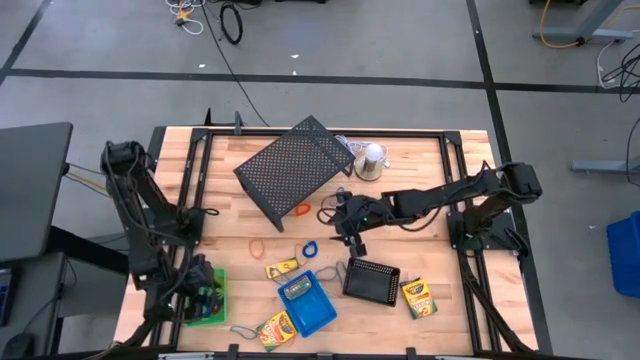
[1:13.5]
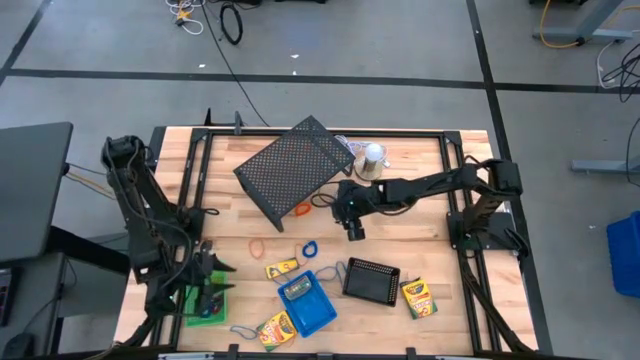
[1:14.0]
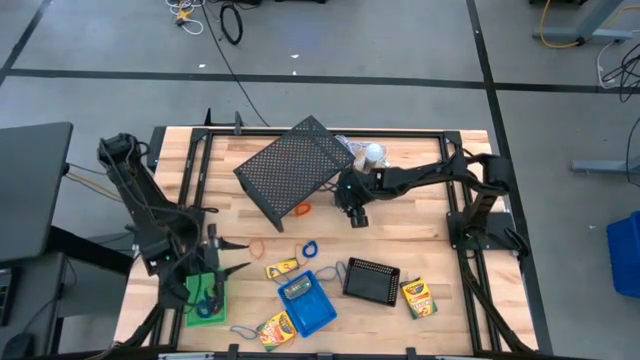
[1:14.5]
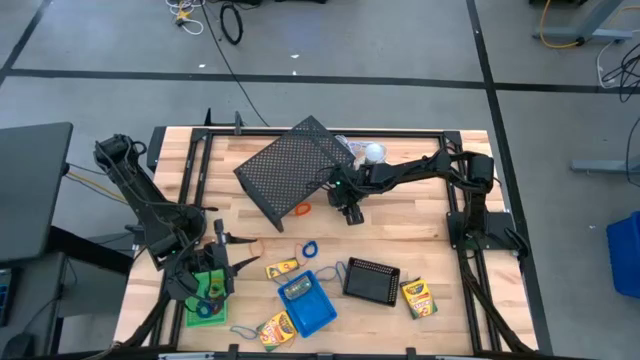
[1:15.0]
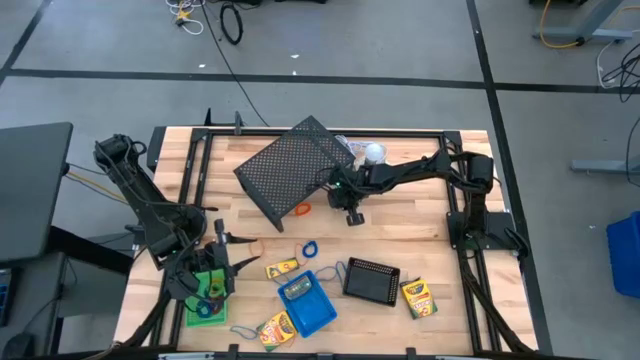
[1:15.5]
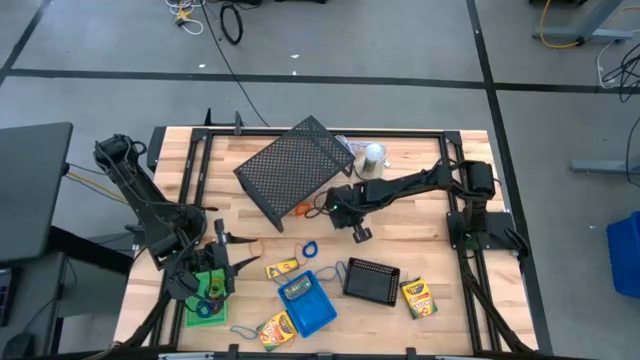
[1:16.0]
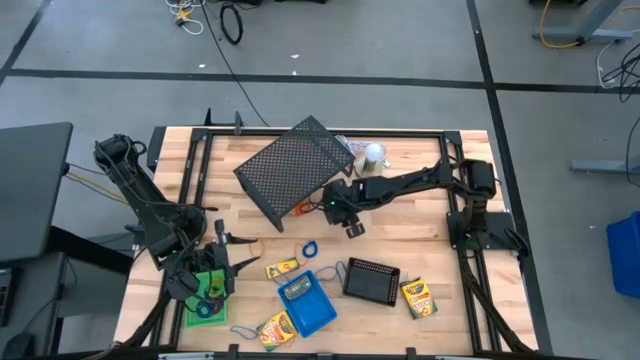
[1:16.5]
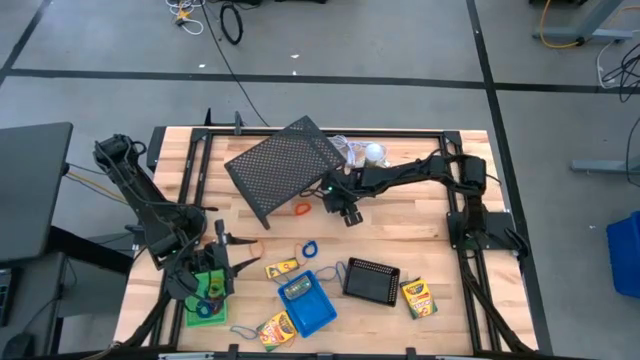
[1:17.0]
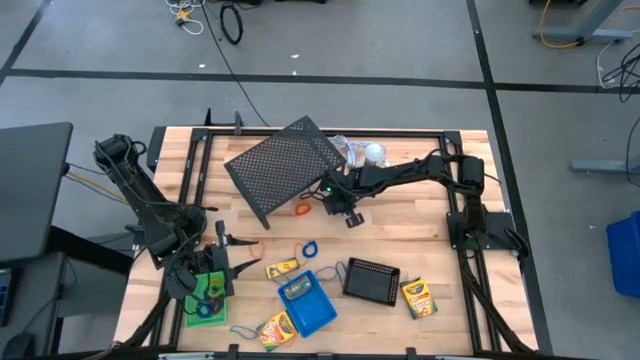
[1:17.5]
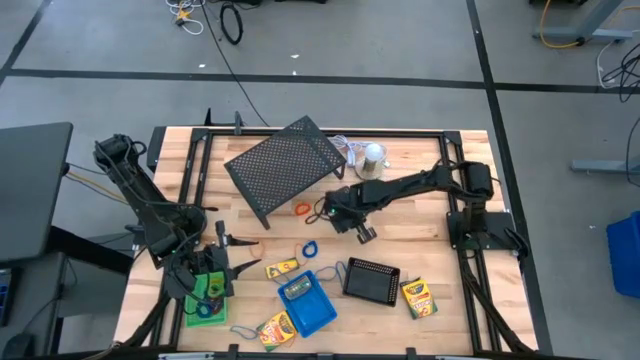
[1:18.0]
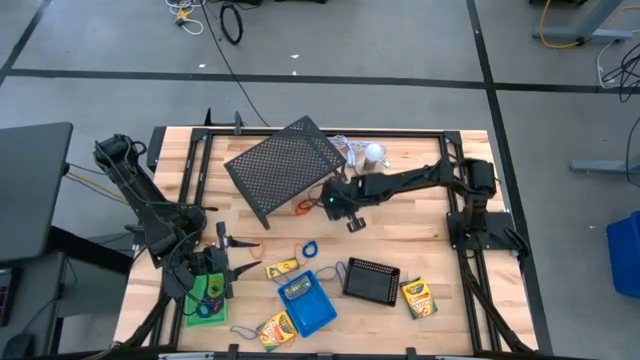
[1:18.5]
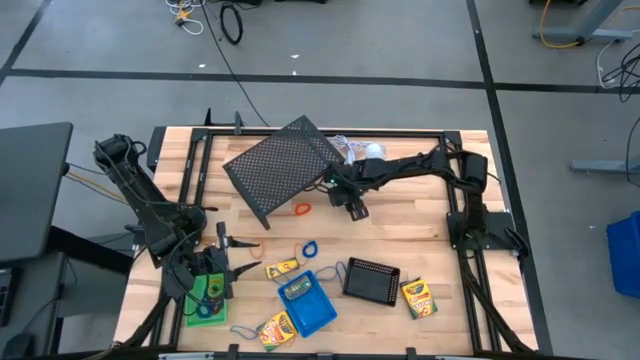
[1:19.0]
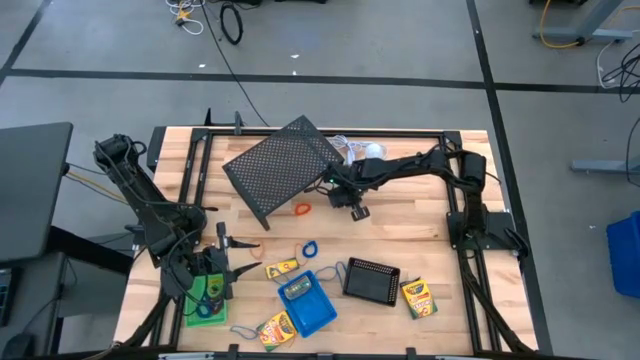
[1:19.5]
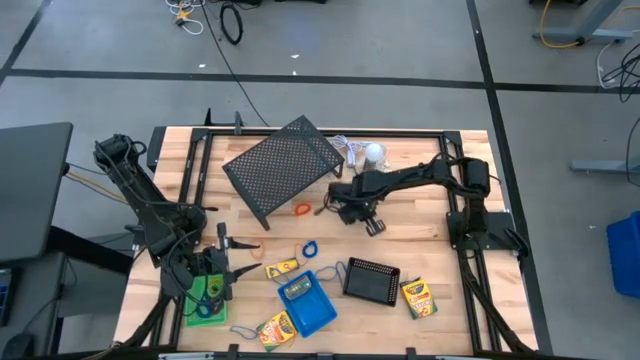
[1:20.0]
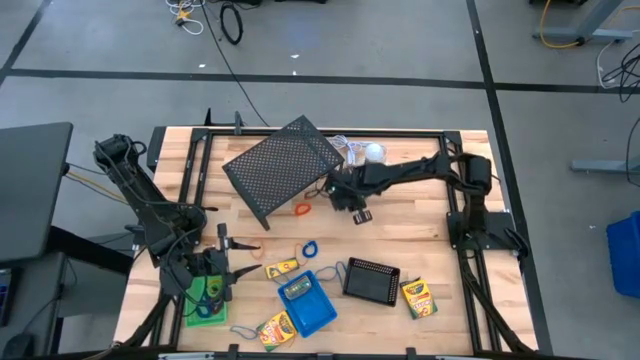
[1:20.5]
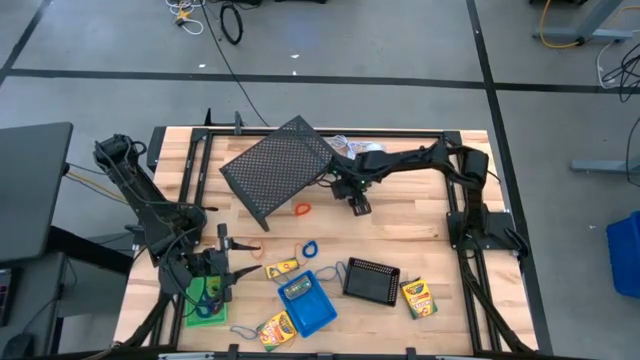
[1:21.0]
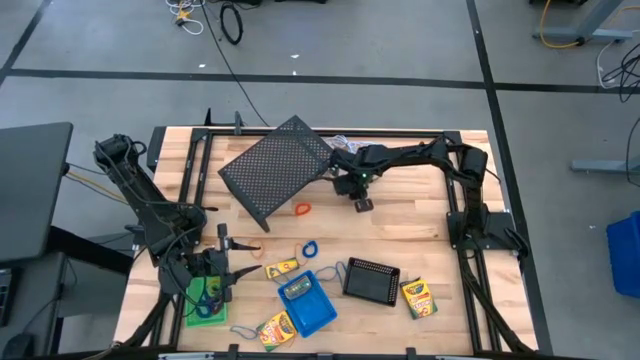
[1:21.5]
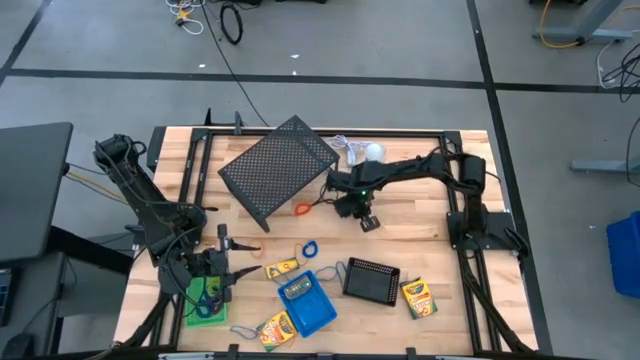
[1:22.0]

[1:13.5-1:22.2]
Task: Pick & Place Office Desk Supplies
Put the blue rubber band into the black bin

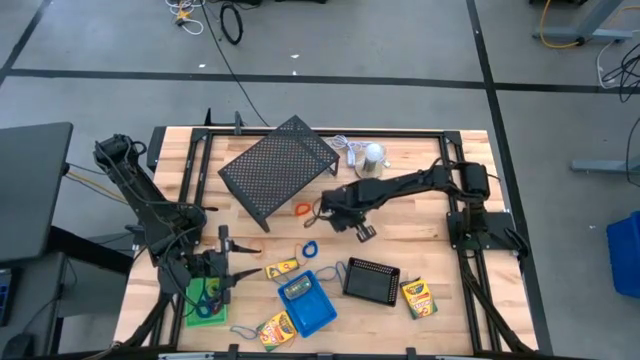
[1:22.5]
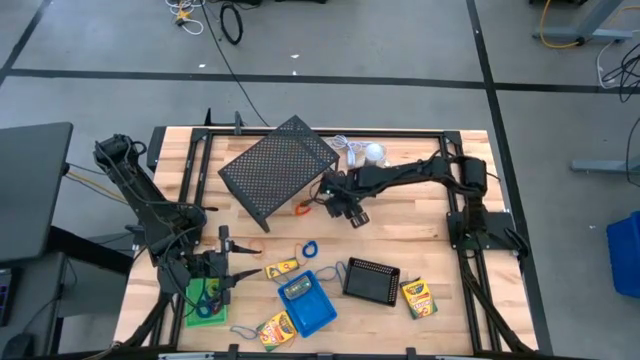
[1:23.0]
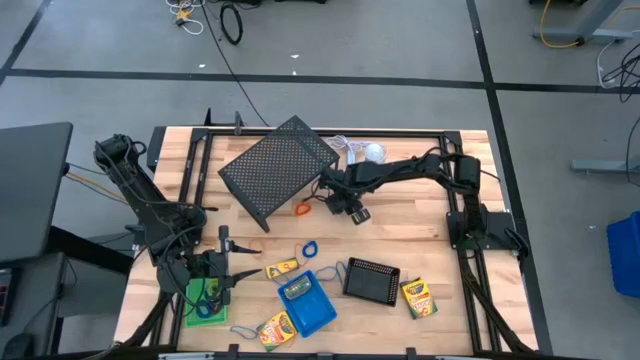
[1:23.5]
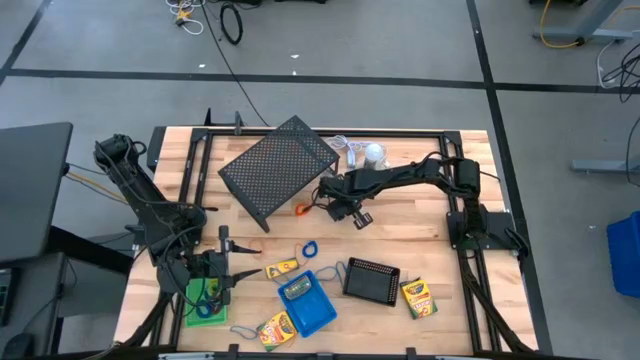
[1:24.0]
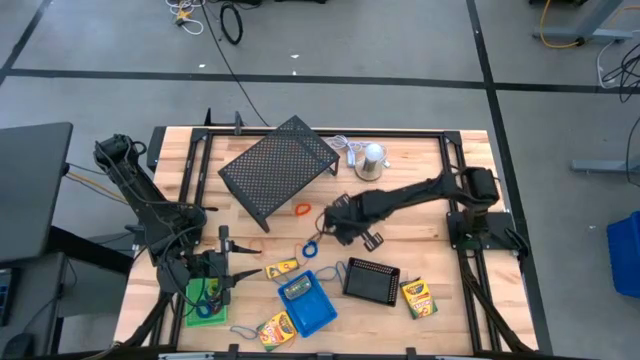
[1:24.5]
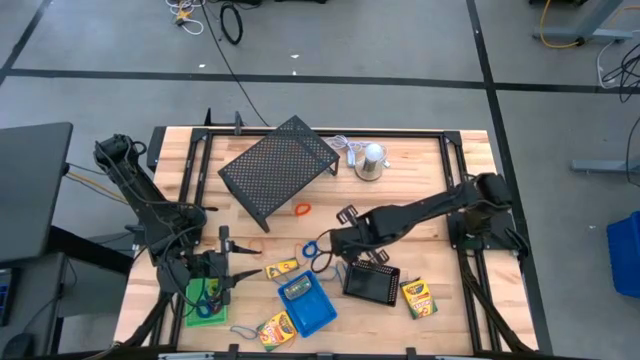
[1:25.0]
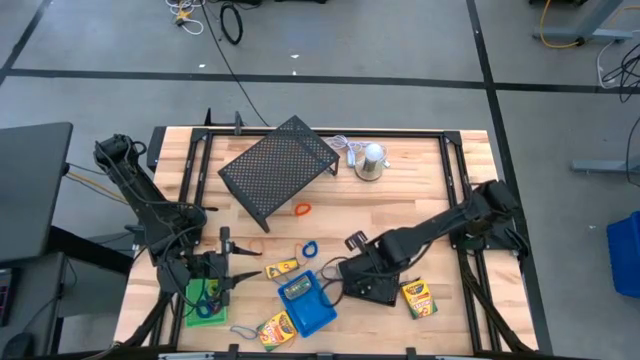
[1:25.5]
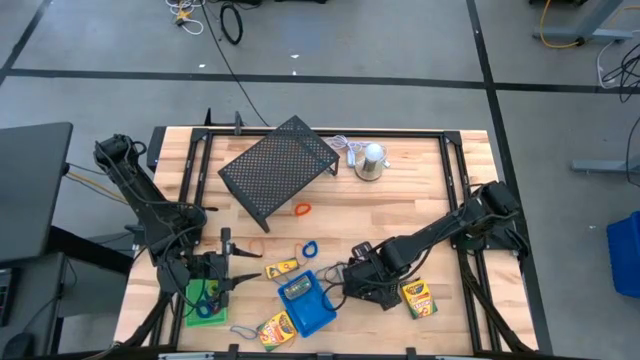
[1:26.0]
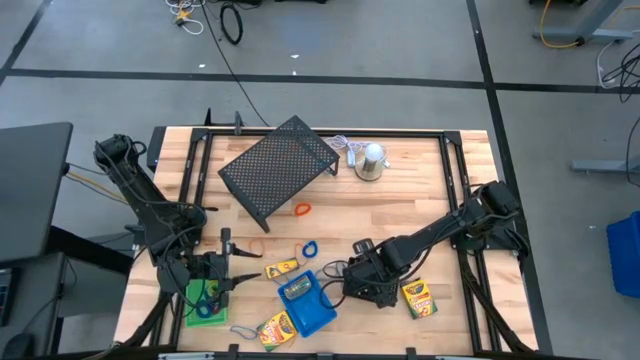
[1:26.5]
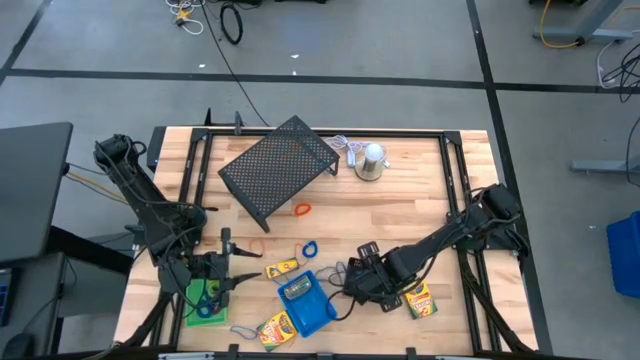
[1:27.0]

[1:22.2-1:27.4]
Put the blue rubber band into the black bin

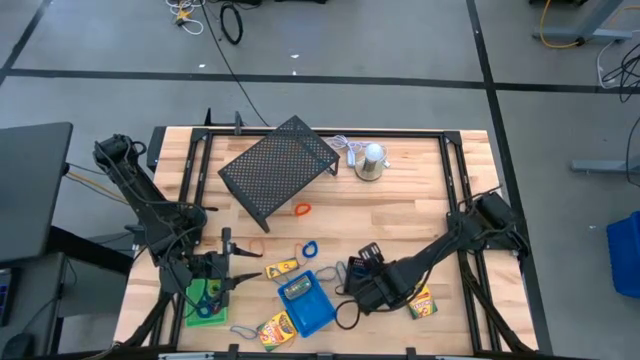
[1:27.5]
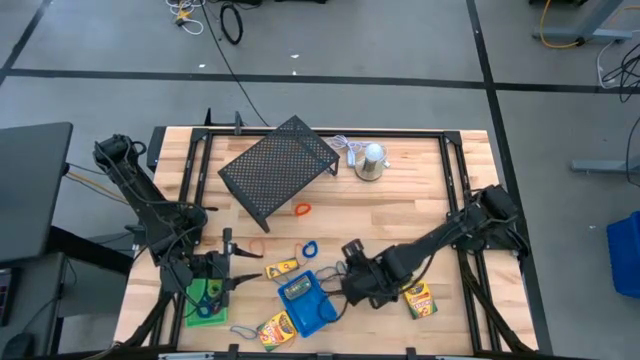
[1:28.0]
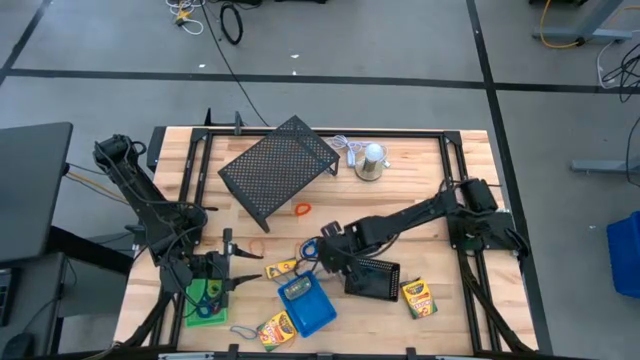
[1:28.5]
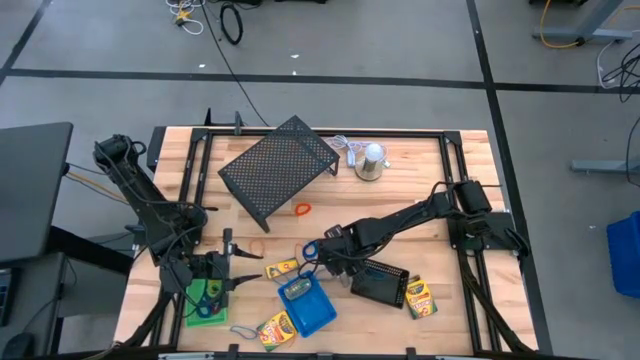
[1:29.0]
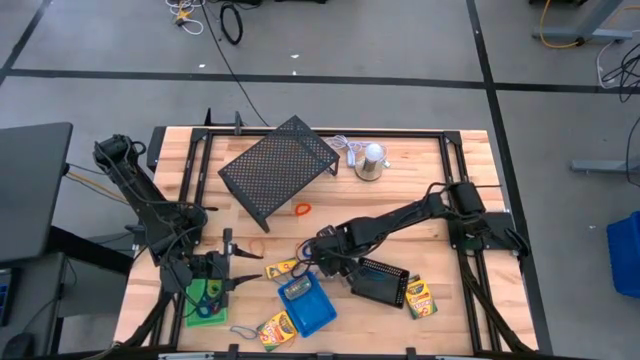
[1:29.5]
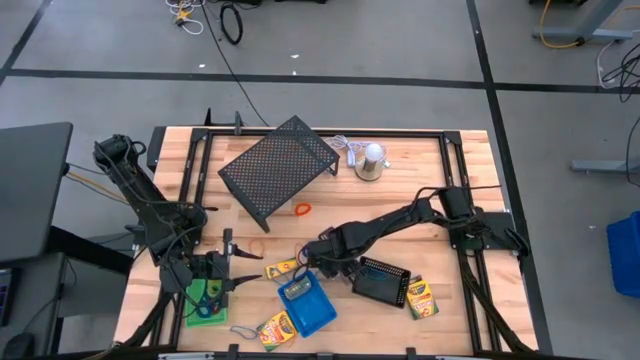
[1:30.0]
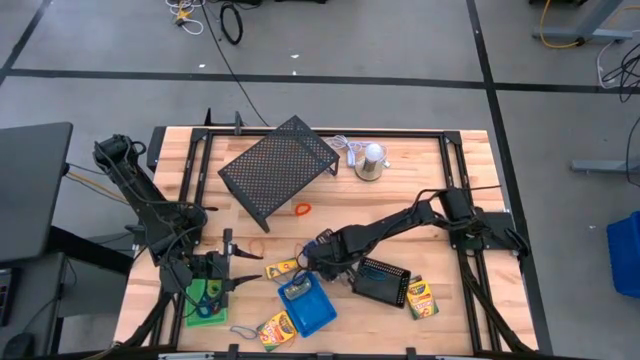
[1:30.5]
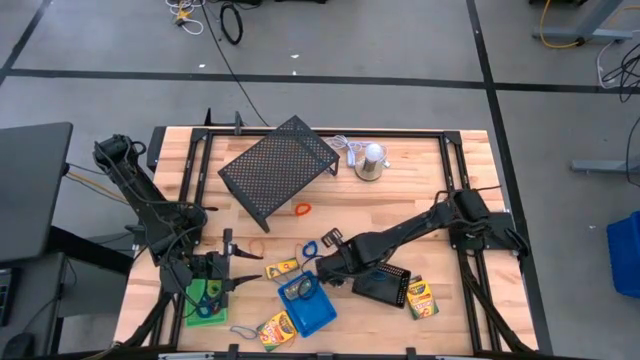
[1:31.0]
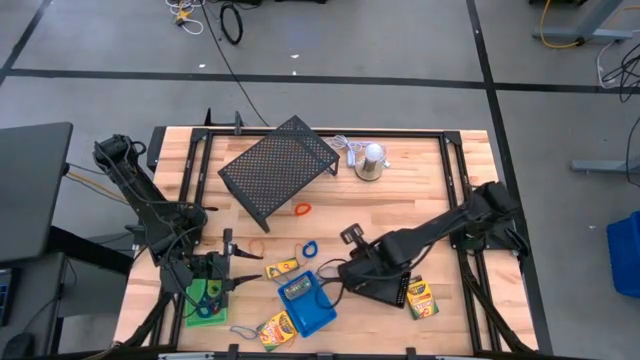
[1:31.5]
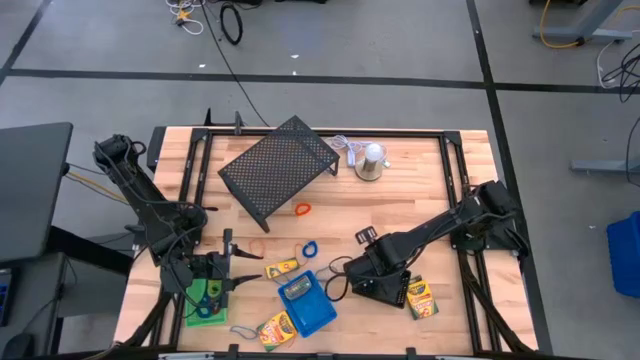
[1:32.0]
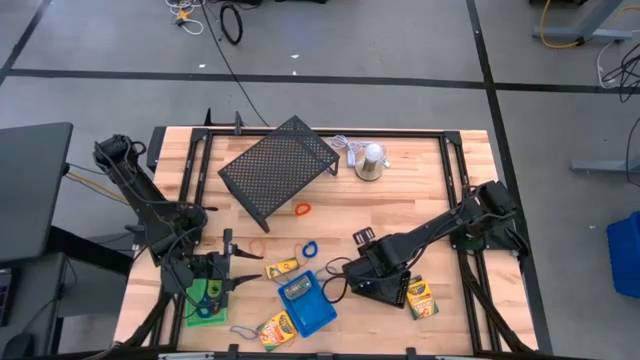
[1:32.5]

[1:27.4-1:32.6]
Put the blue rubber band into the black bin
